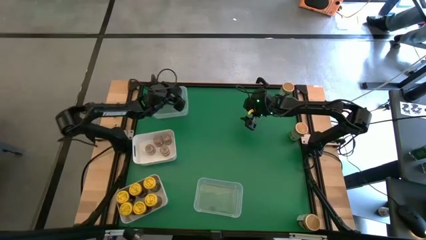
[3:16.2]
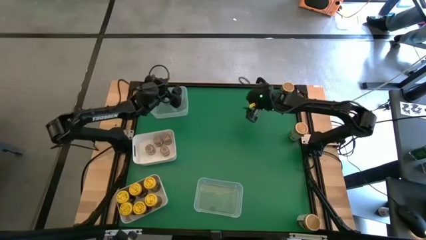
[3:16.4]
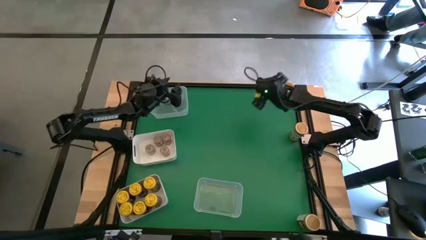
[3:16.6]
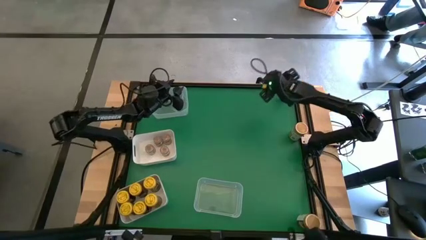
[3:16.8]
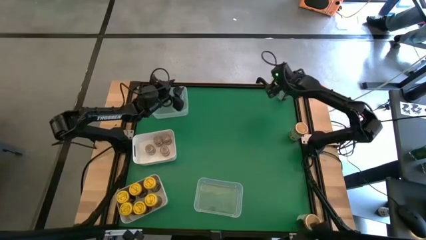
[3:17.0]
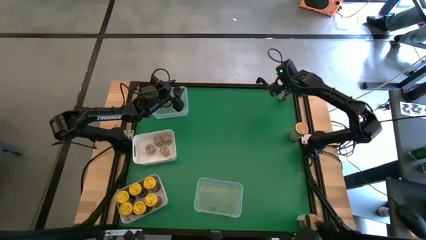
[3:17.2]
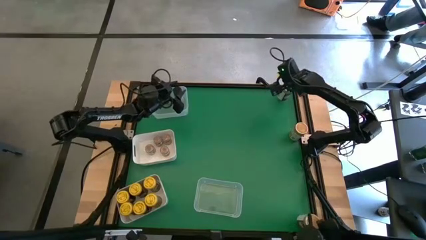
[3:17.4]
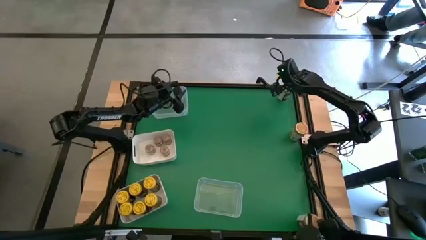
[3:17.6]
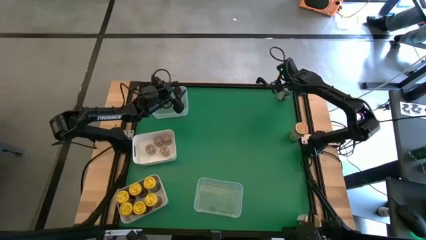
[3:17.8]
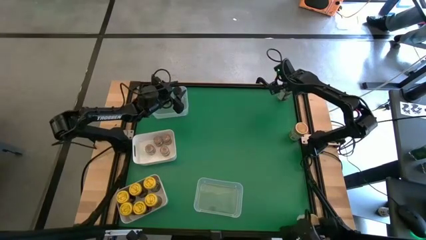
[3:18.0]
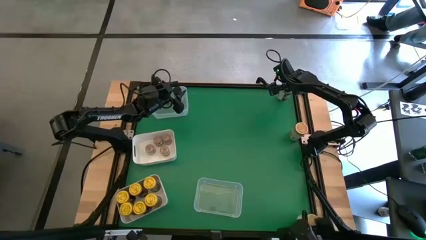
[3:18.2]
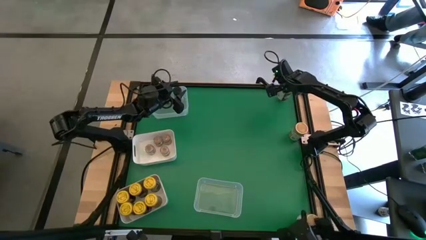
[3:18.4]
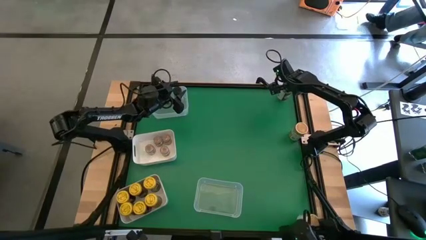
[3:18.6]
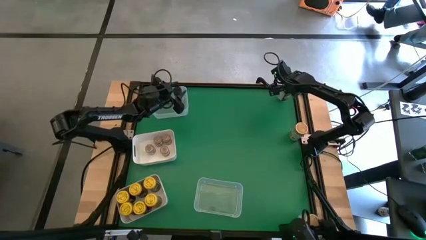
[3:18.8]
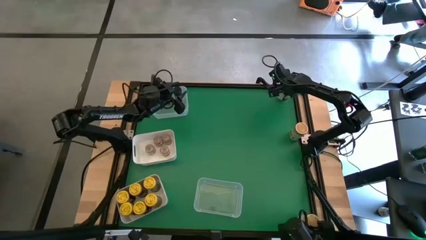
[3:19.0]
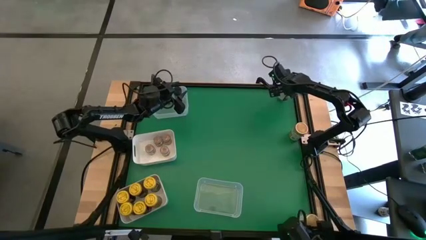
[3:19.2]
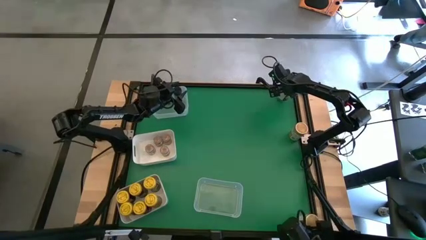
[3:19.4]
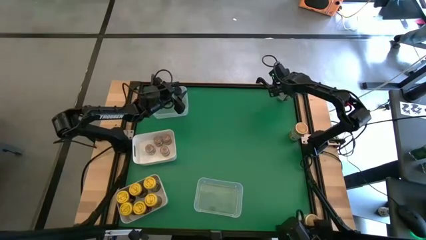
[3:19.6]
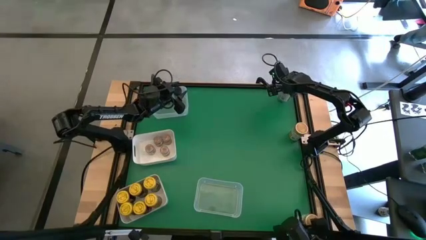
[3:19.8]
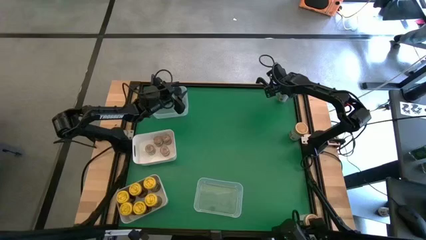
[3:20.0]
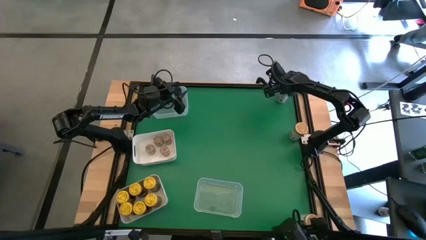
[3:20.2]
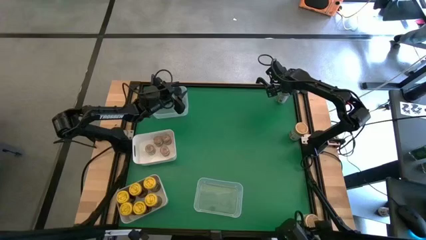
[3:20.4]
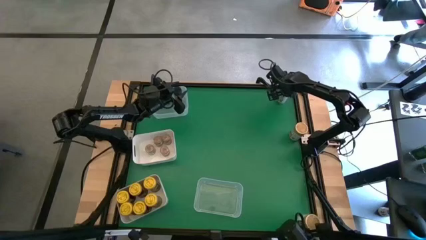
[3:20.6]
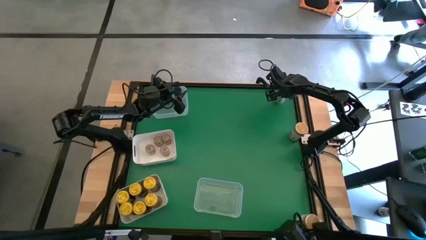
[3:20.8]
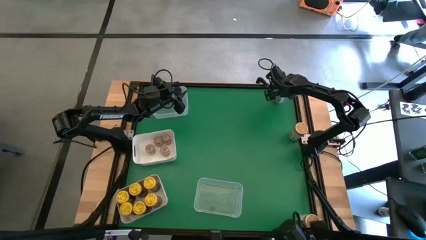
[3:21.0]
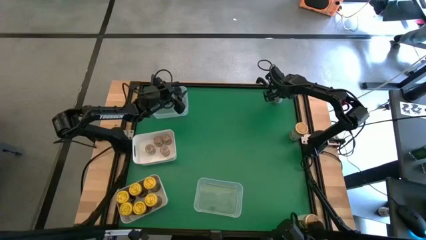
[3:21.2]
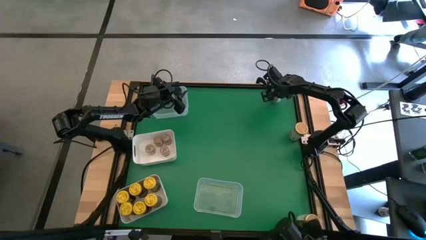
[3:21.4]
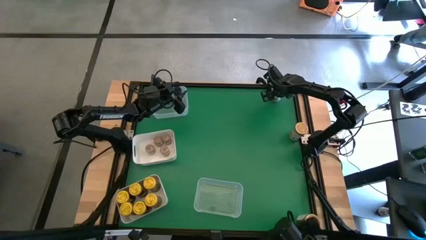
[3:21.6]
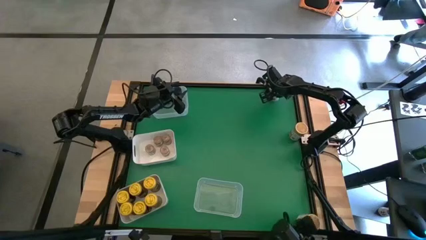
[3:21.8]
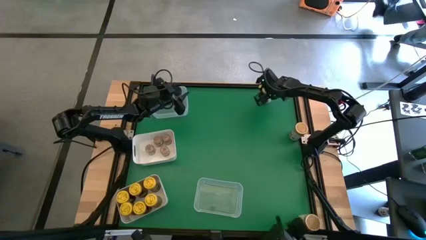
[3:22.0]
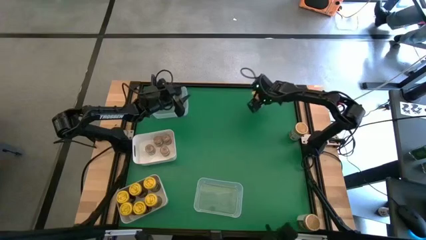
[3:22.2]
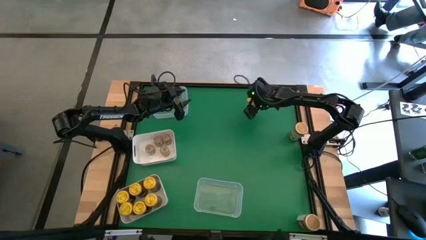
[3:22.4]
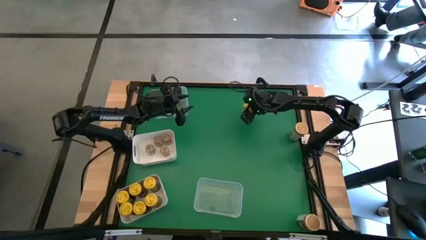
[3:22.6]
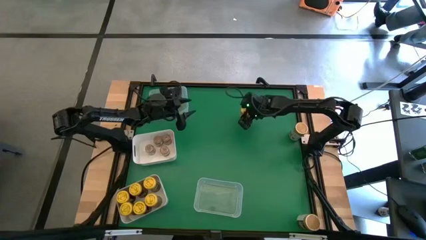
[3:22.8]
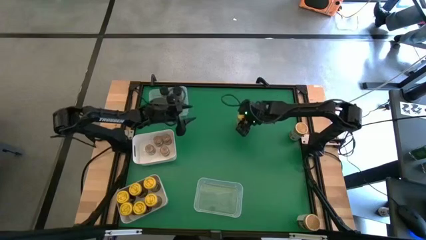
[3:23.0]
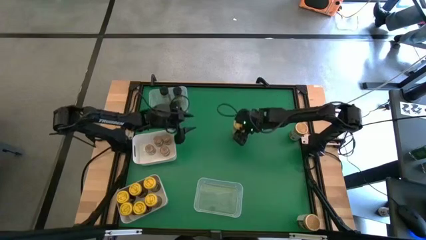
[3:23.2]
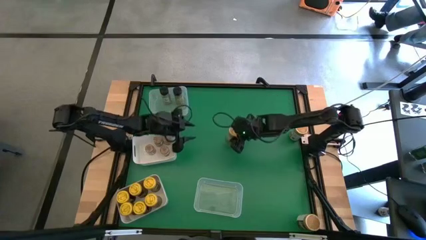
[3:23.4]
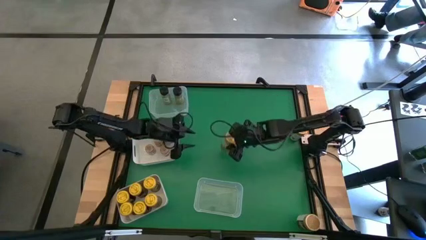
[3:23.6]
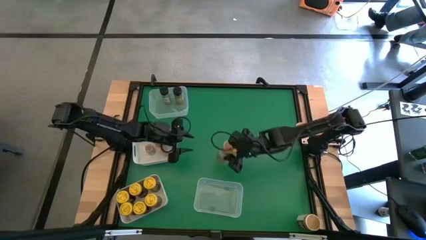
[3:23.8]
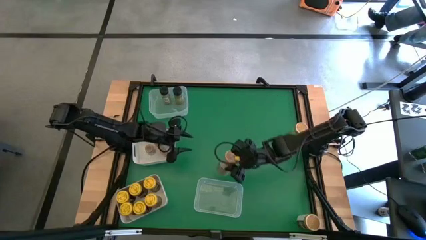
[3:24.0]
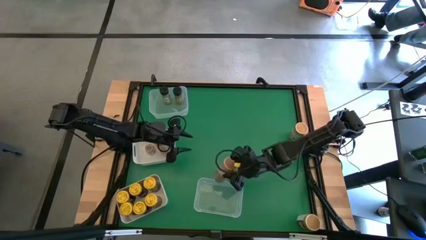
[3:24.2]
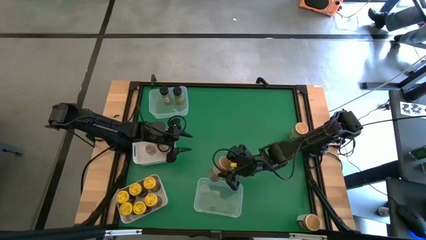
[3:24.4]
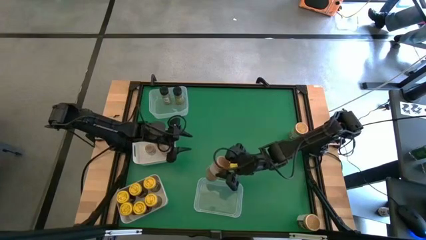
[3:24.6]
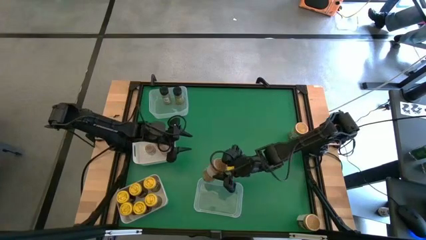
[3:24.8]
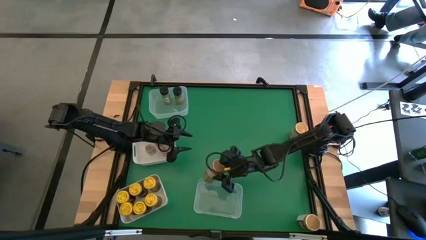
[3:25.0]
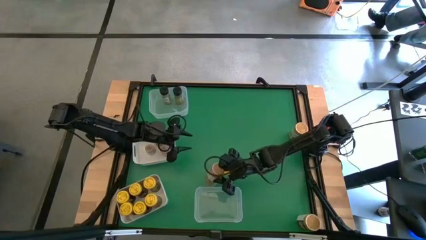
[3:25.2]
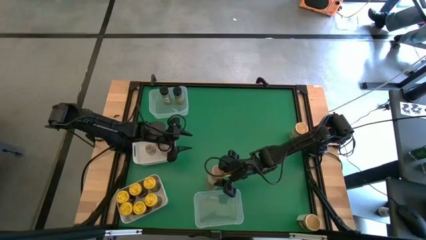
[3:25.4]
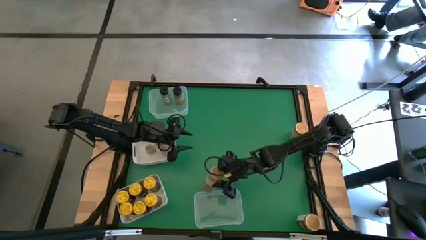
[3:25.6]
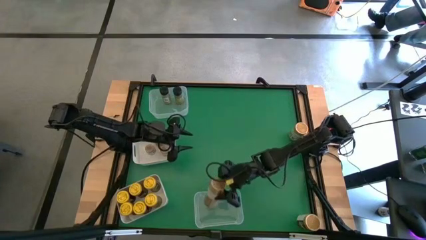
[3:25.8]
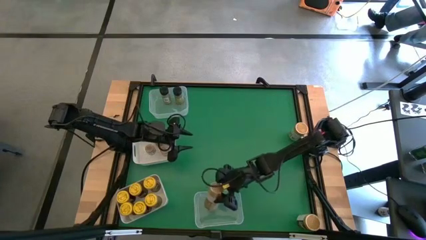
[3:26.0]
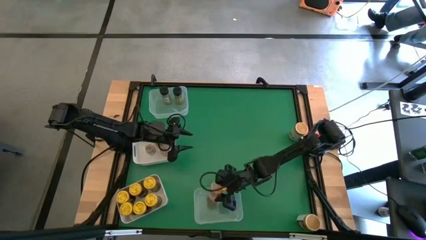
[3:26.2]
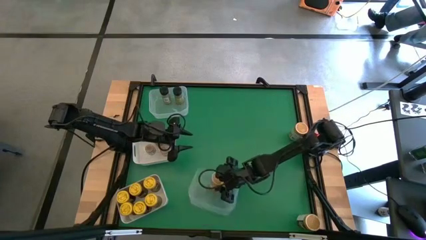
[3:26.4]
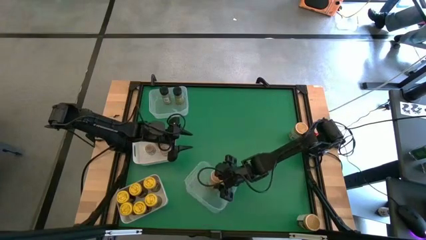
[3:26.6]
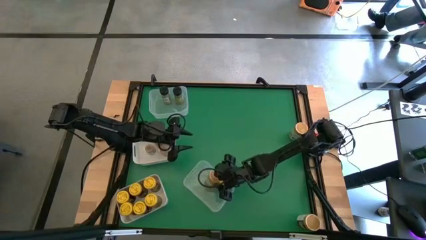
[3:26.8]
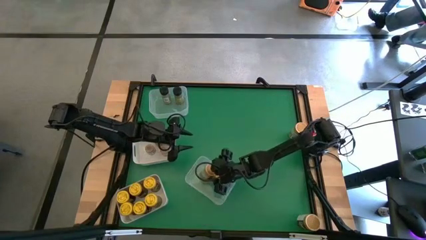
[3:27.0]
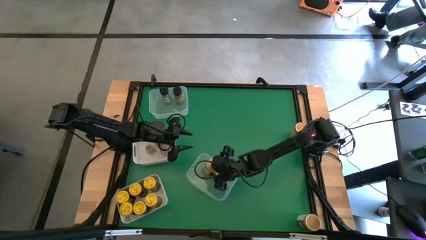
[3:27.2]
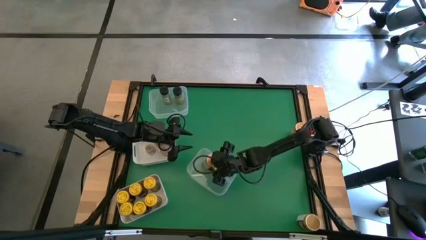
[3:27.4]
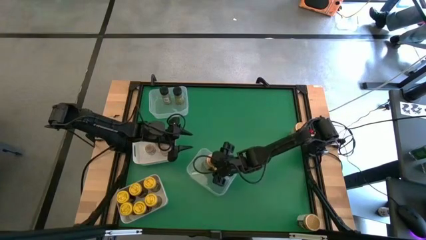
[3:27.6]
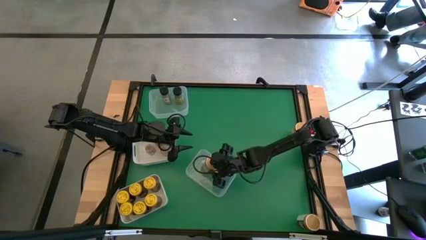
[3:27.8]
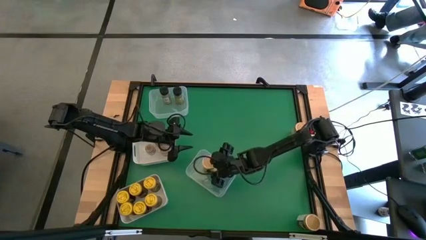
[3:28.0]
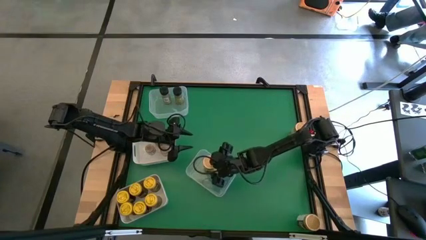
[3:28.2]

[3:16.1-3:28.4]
Task: Sort spices by type
Put the golden spice bottle into the bottom transparent bin

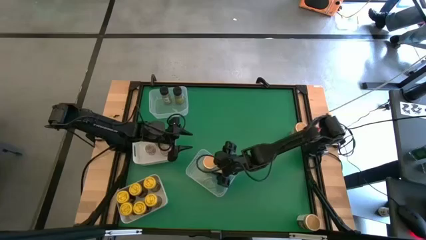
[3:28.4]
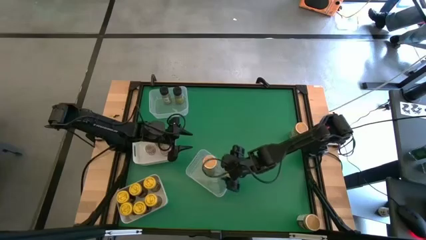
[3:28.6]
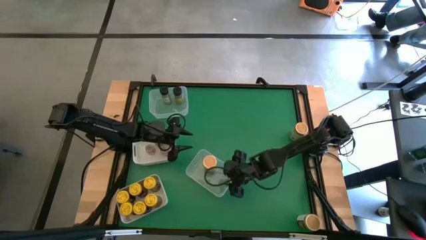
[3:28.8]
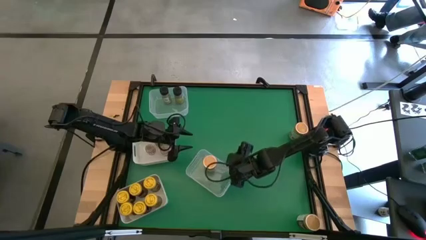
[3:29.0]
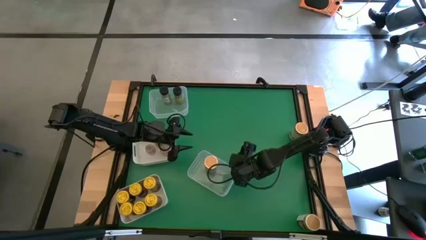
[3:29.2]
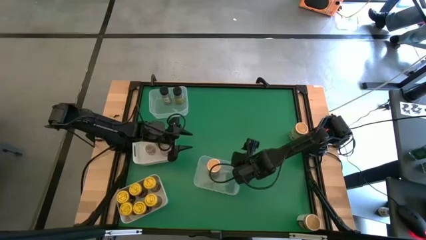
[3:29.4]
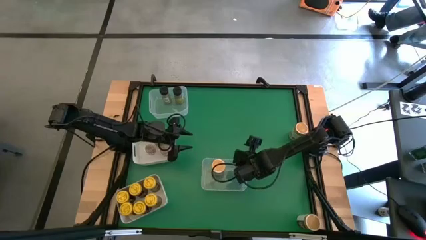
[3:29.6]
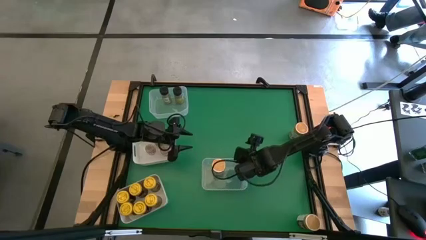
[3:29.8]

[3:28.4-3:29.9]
Adjust the bottom transparent bin on the table

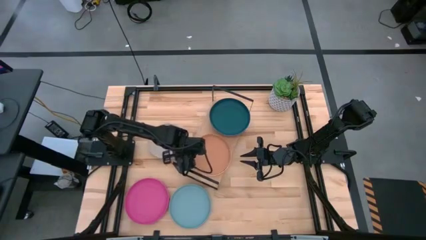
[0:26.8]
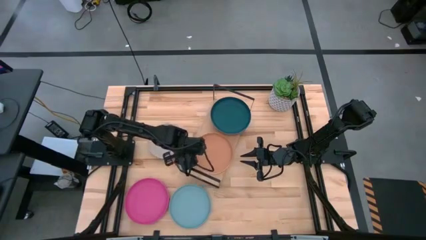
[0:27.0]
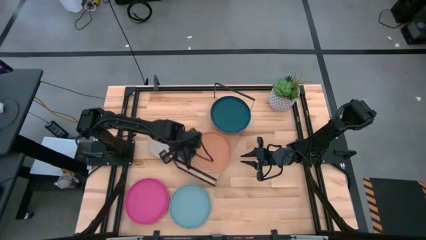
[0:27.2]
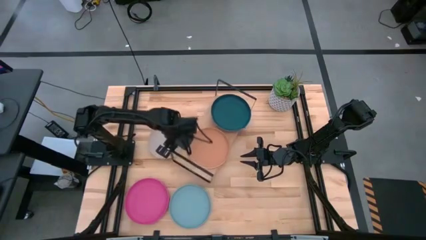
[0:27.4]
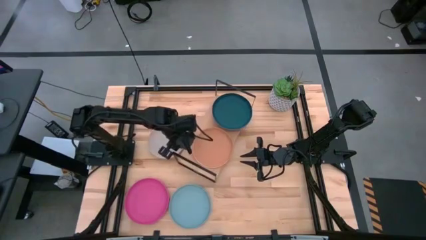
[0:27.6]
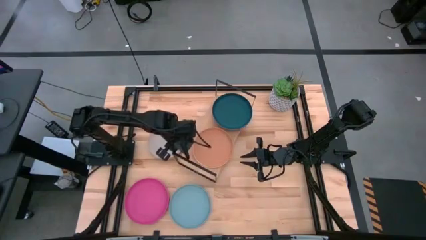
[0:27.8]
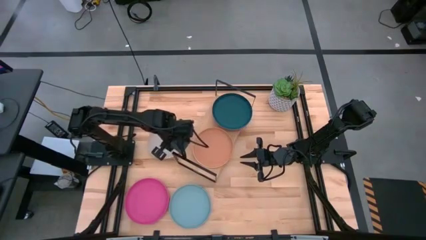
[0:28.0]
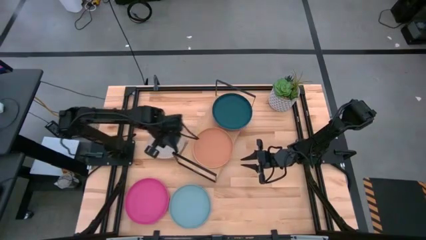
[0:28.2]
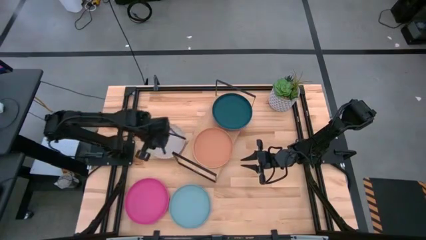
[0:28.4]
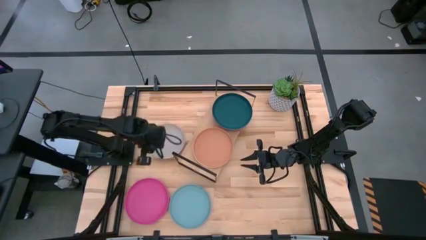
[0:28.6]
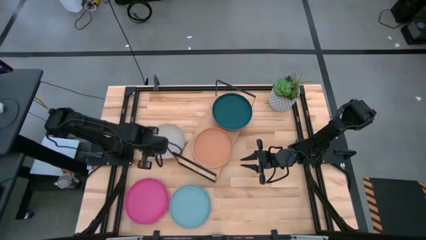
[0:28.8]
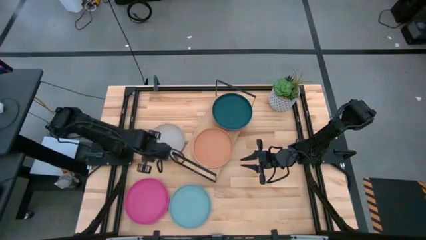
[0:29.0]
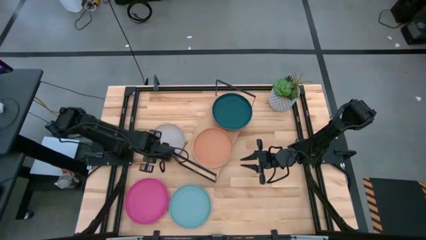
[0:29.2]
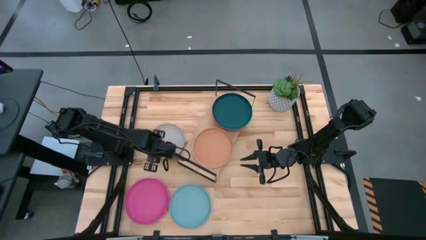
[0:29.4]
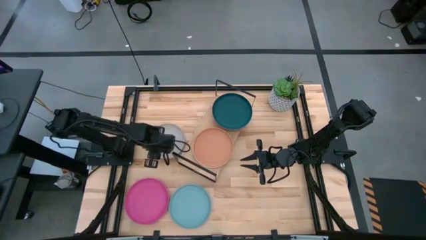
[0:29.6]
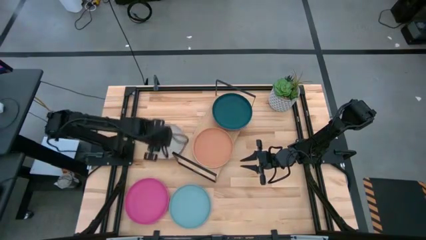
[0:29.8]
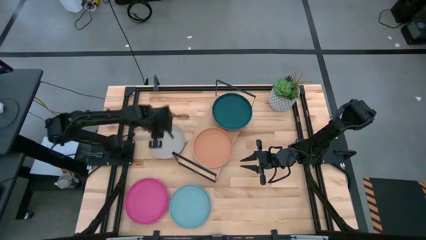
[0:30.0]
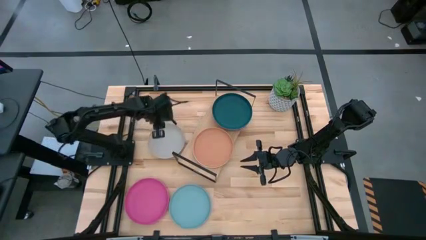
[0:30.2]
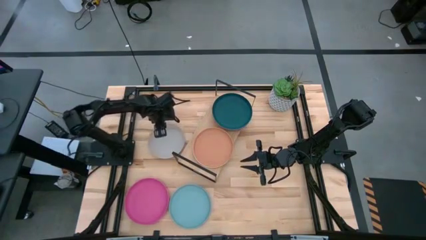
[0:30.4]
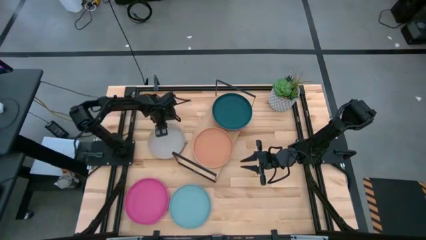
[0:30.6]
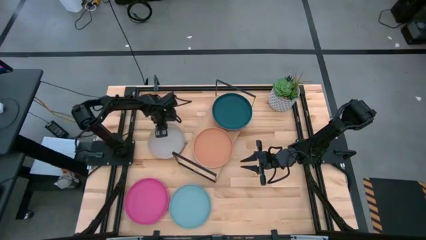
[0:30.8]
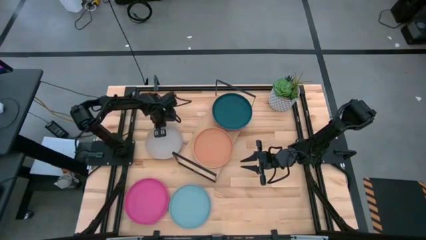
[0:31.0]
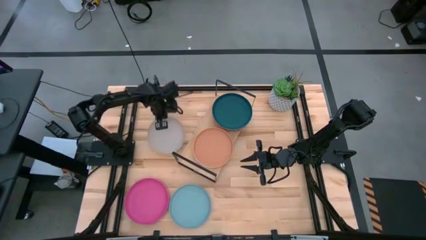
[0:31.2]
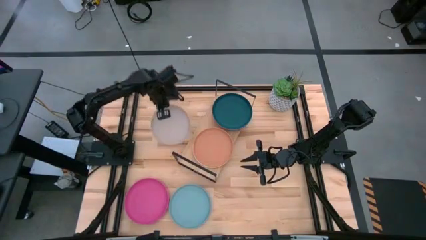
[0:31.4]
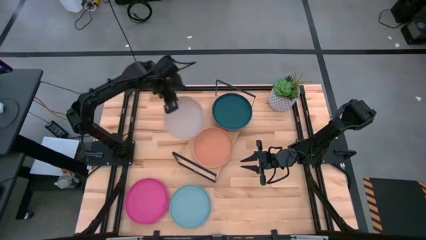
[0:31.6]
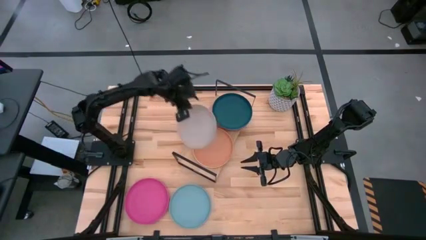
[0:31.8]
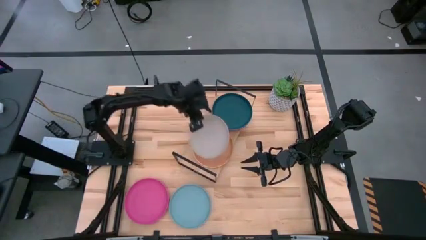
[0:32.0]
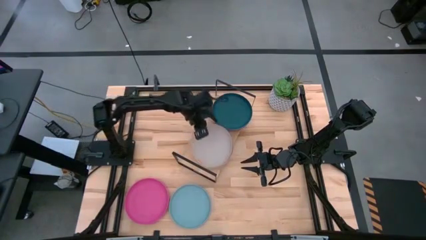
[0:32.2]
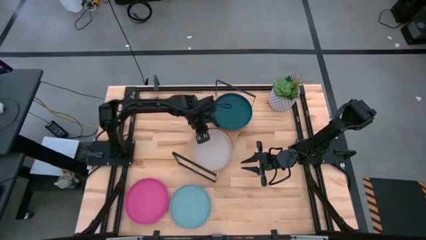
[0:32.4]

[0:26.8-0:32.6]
Task: Place and stack plates onto a shelf
Stack the grey plate on top of the brown plate on the shelf
